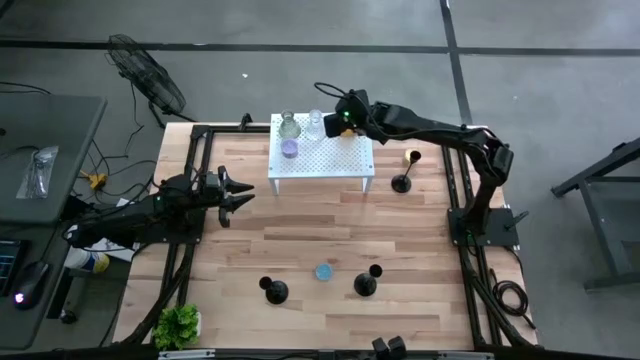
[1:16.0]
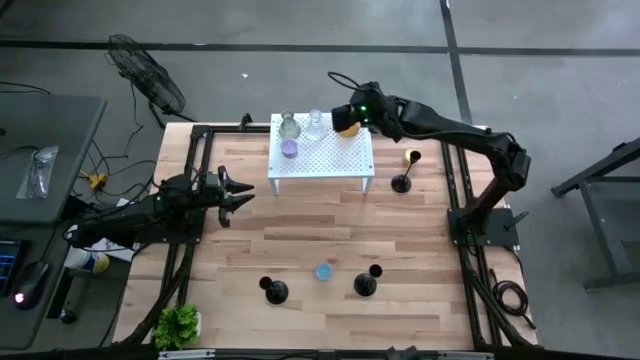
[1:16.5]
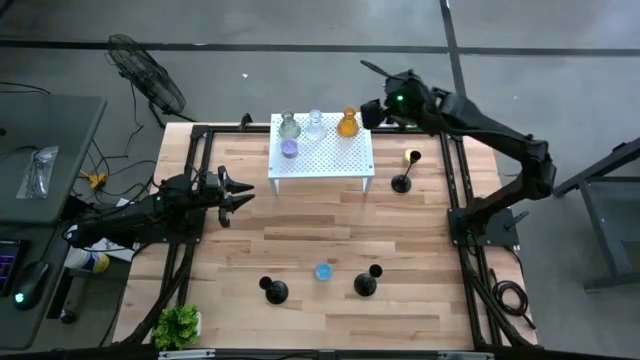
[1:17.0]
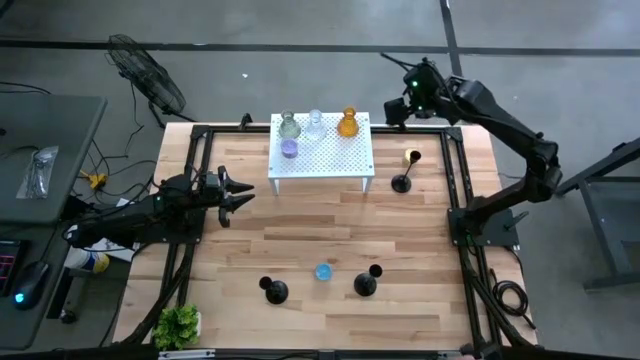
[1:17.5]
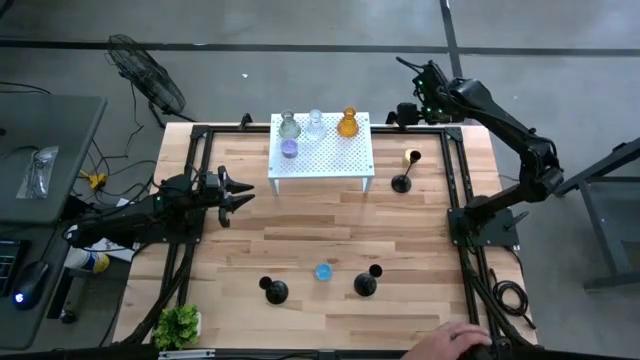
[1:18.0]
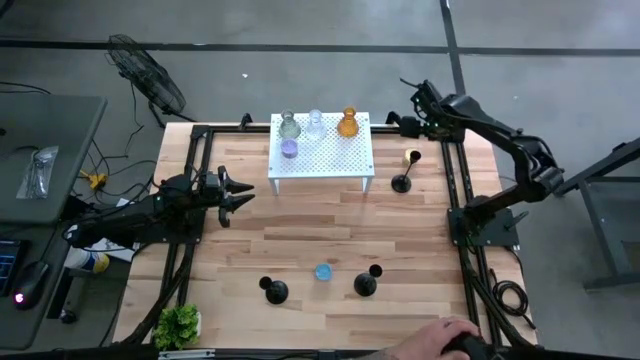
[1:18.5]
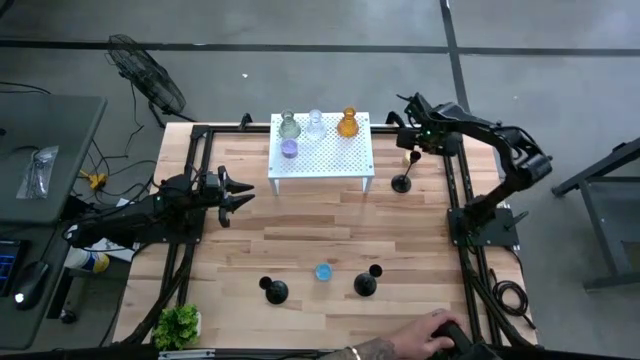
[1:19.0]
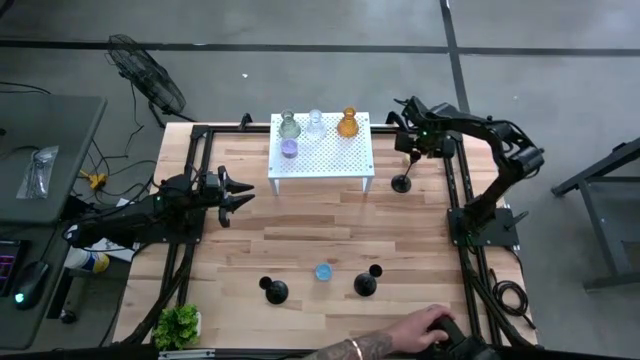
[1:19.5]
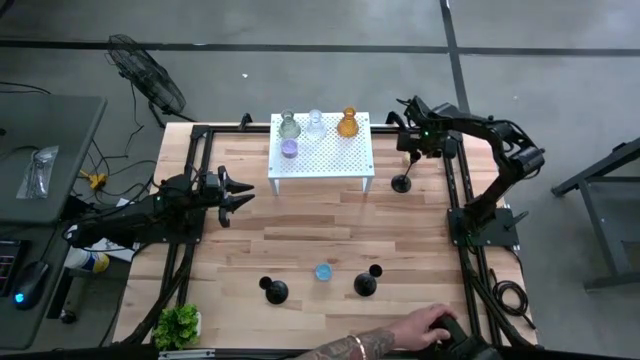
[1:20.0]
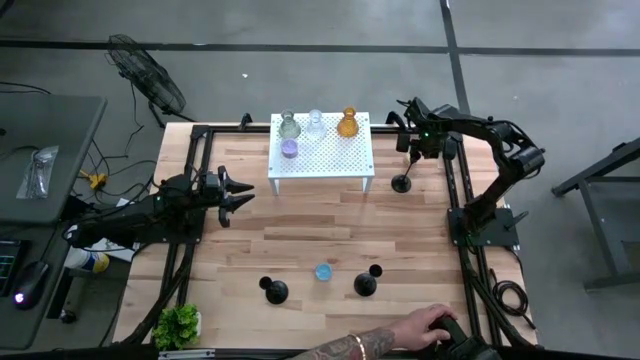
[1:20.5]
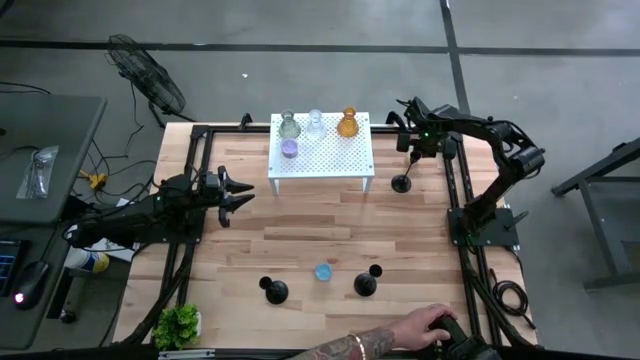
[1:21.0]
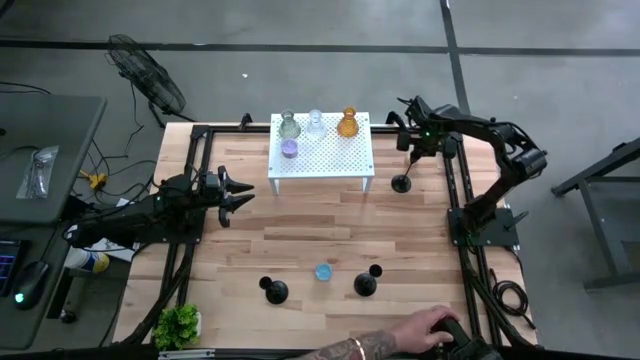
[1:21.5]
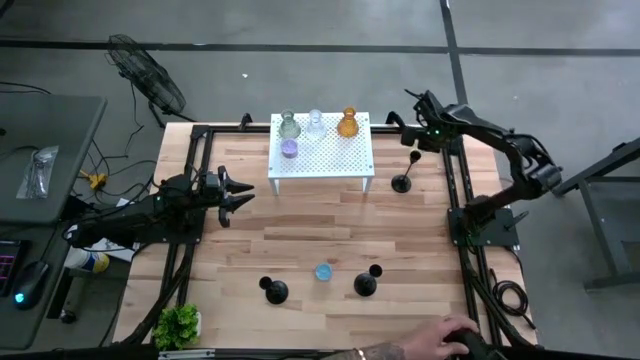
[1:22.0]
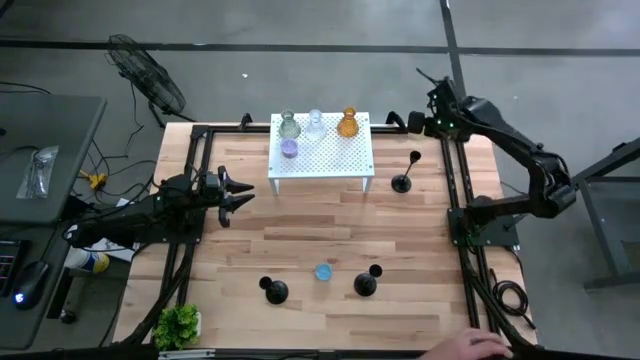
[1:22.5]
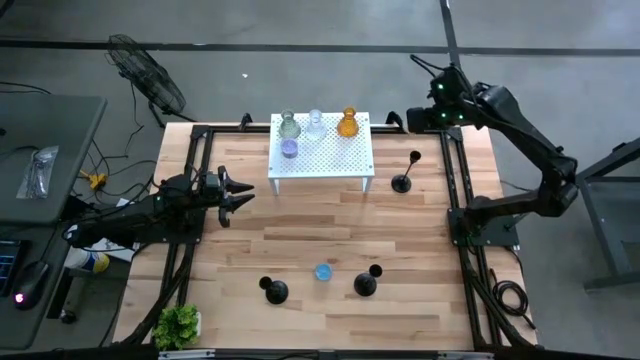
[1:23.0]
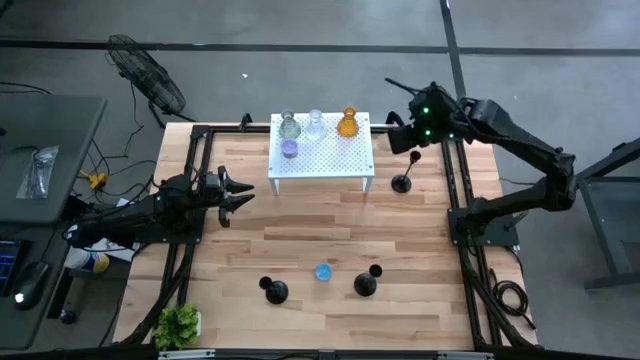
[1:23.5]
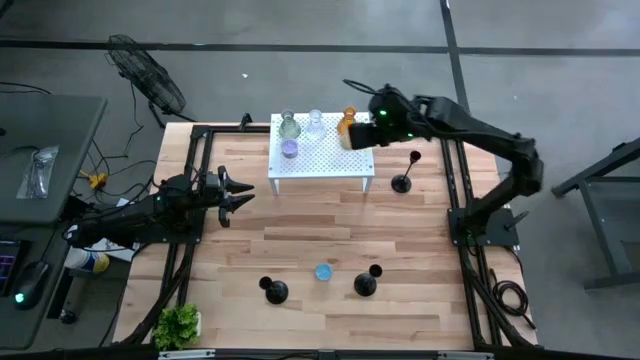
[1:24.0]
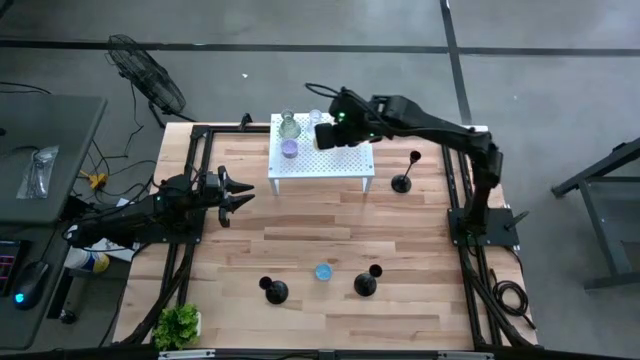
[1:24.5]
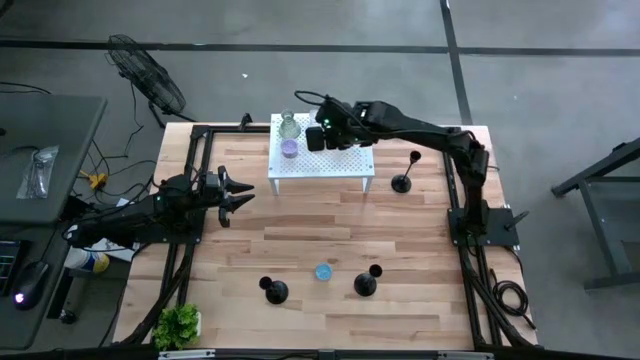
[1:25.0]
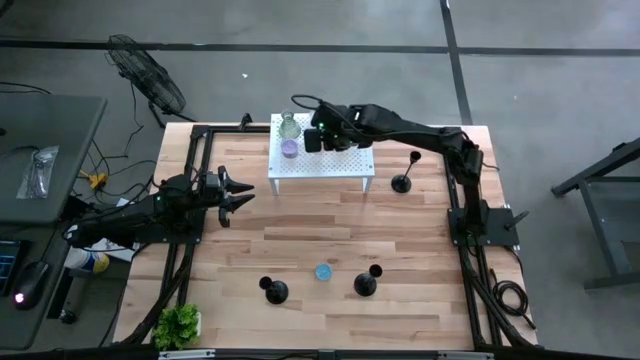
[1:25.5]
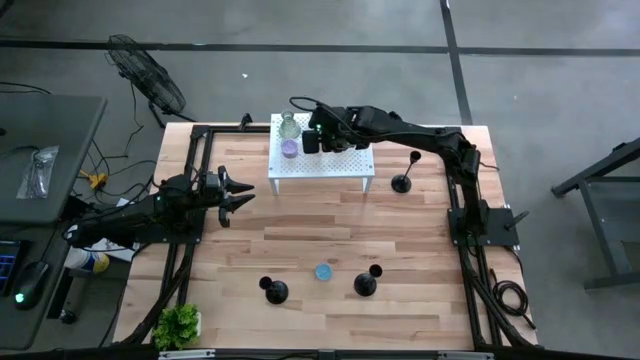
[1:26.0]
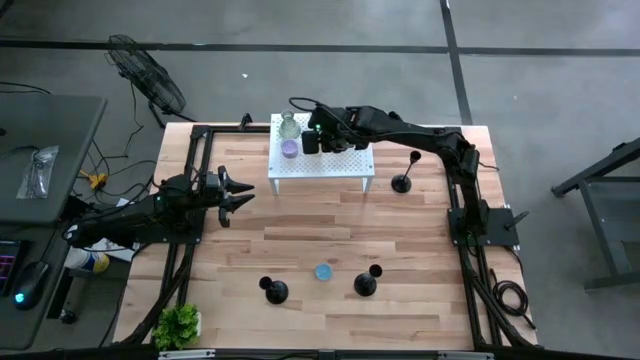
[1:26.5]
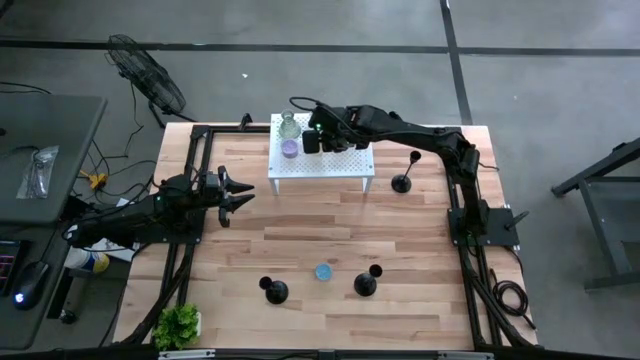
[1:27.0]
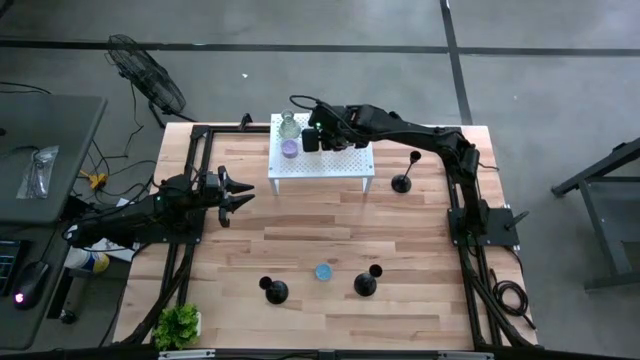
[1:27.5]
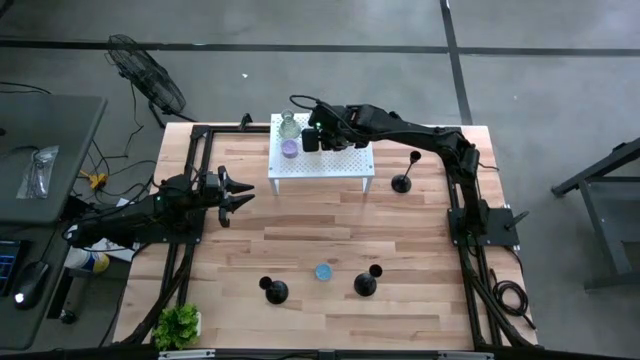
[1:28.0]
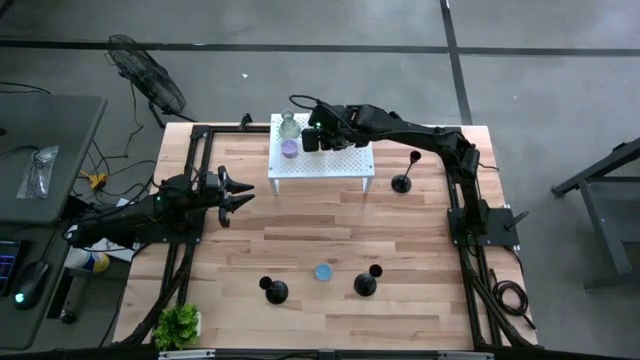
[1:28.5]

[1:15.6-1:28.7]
Task: Pick & Place candle stick holders
Put the yellow scented candle on the shelf aligned with the other scented candle

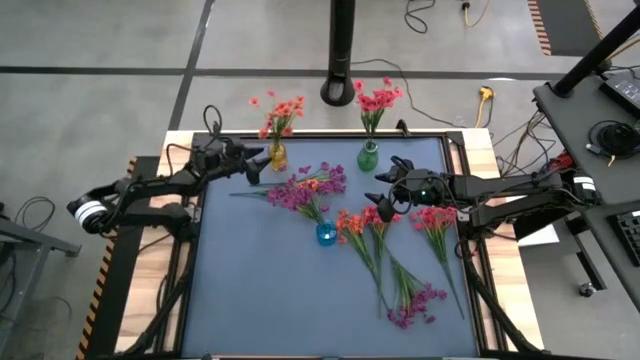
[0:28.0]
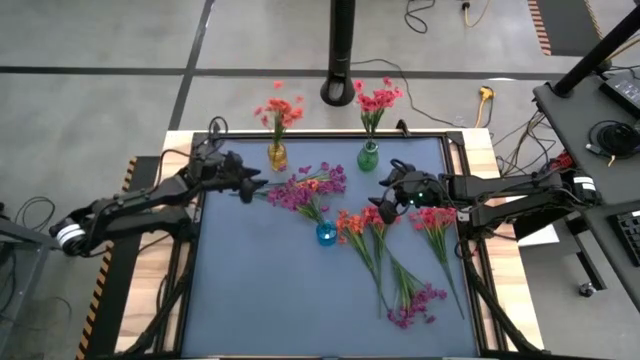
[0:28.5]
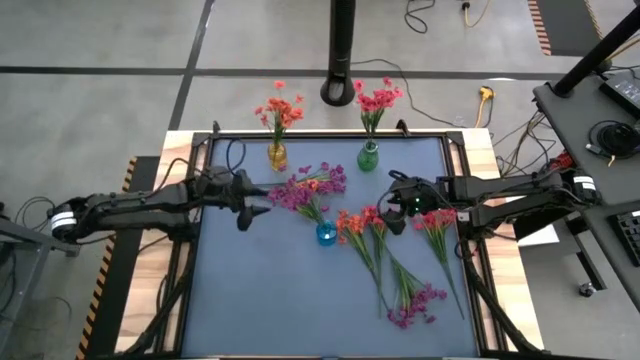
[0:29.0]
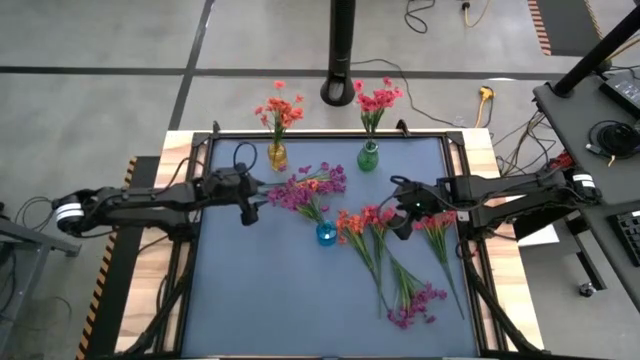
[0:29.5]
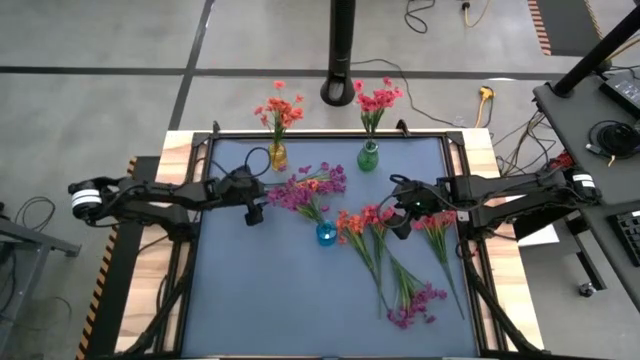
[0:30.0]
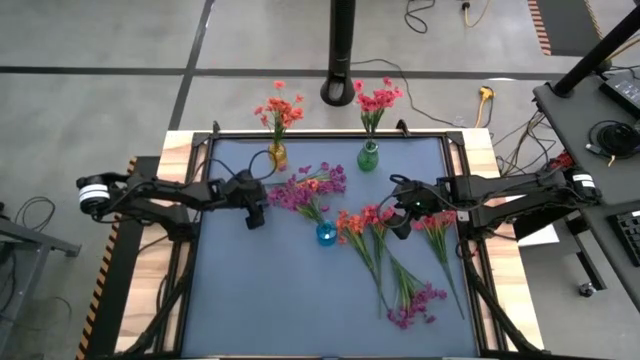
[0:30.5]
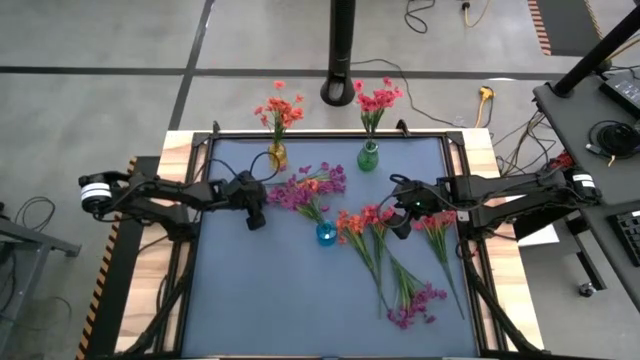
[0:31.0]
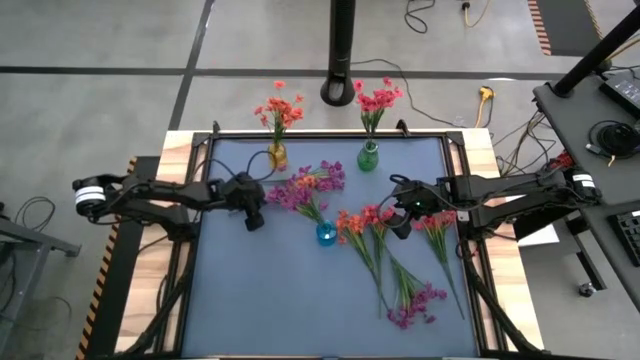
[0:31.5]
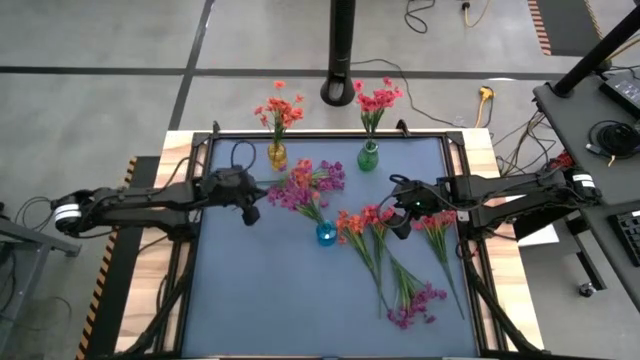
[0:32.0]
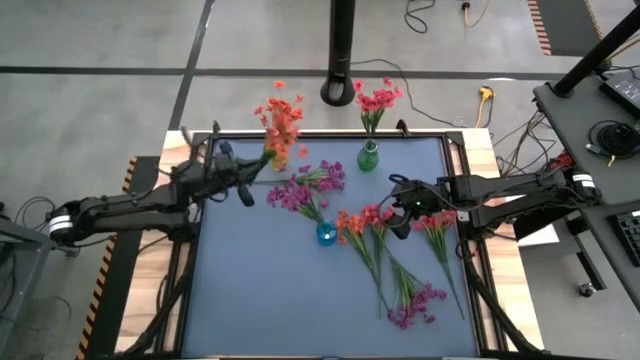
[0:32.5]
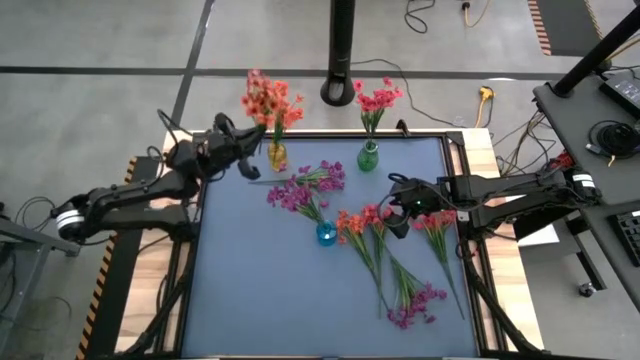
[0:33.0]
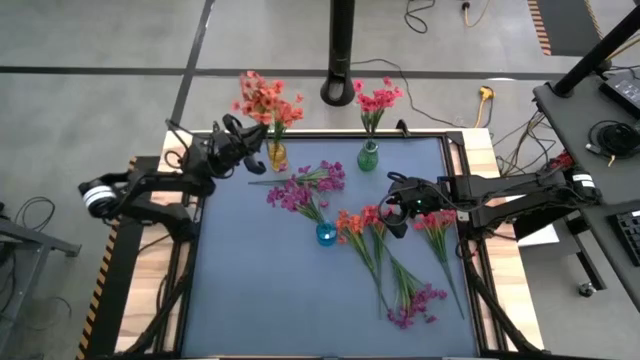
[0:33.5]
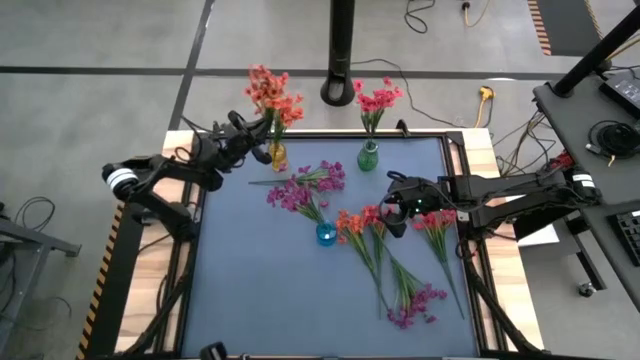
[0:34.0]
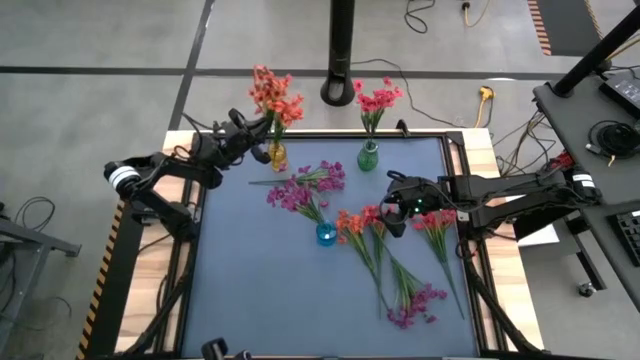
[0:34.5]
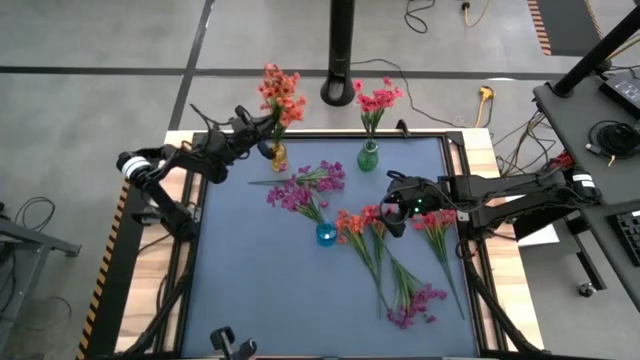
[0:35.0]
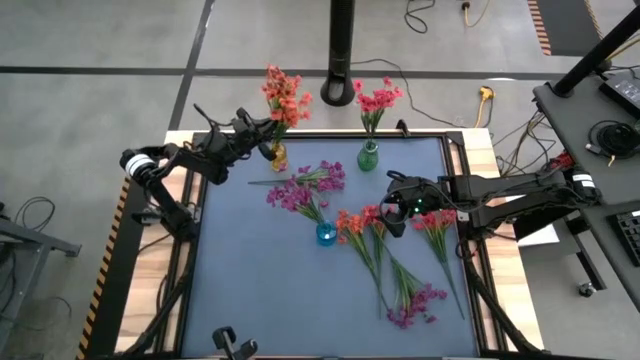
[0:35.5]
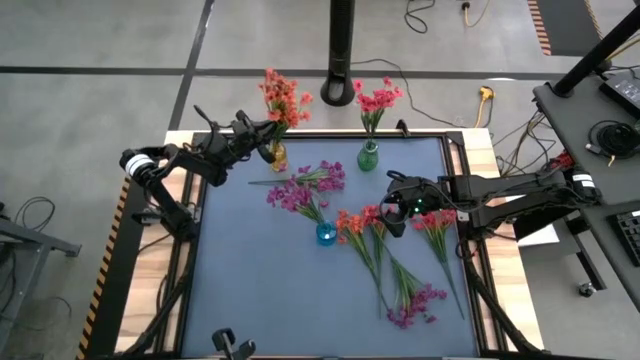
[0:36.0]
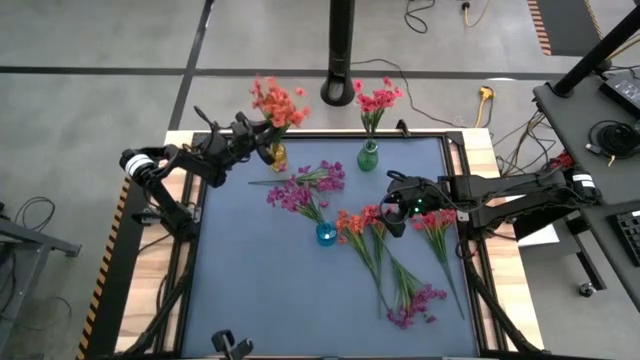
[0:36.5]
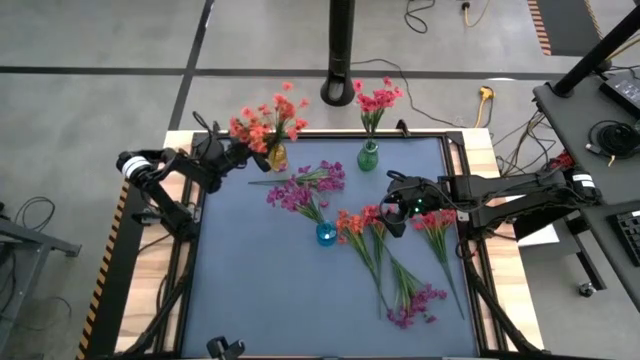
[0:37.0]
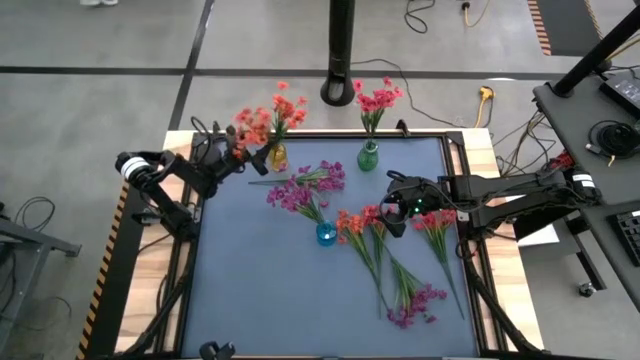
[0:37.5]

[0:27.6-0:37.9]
Task: Sort flowers into vase by color
Put the top orange flower into the yellow vase
